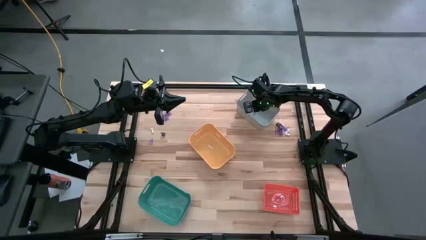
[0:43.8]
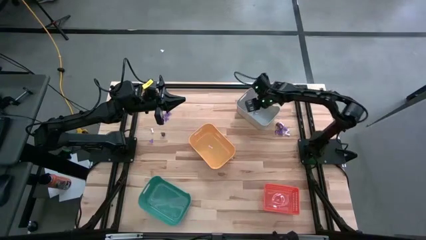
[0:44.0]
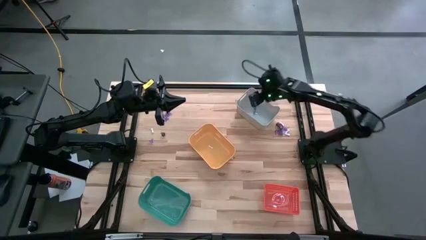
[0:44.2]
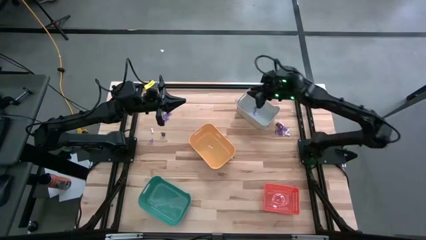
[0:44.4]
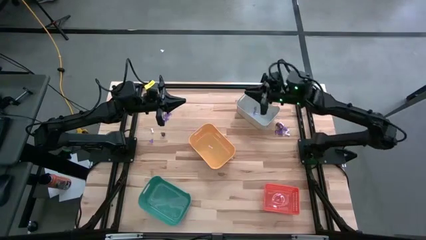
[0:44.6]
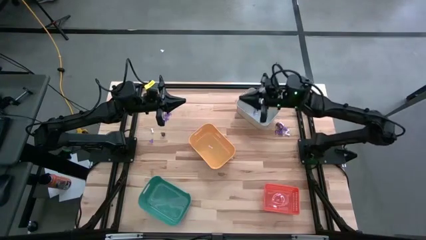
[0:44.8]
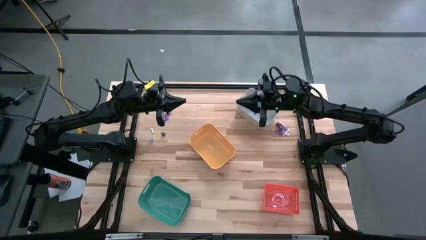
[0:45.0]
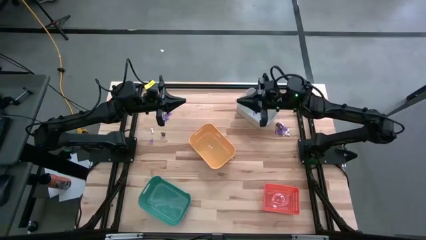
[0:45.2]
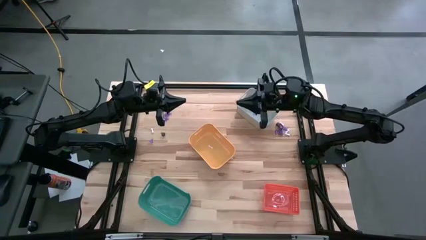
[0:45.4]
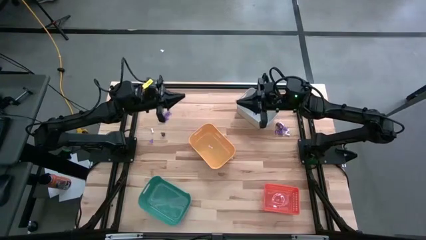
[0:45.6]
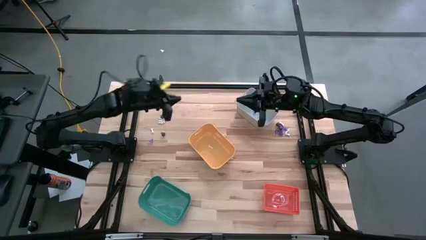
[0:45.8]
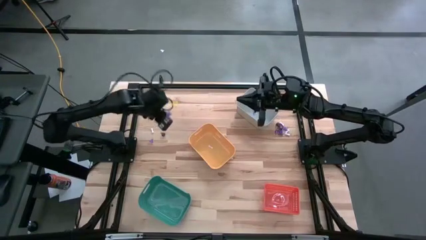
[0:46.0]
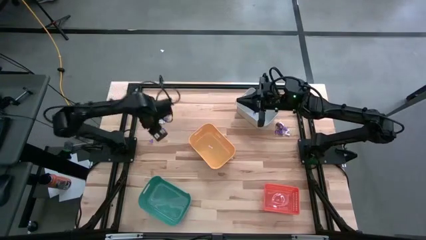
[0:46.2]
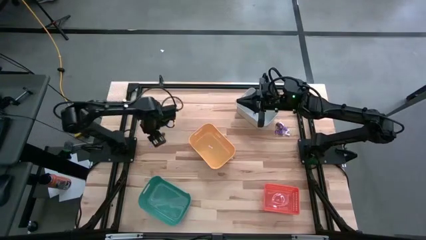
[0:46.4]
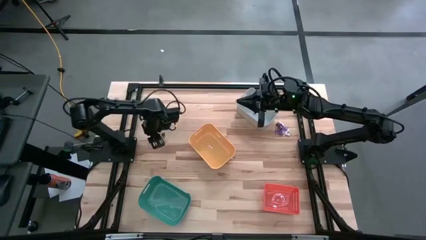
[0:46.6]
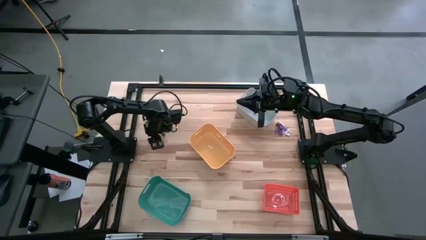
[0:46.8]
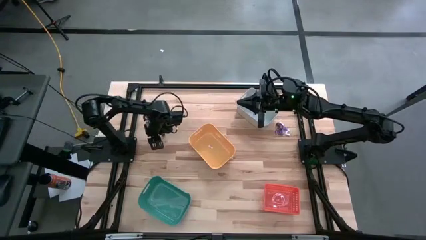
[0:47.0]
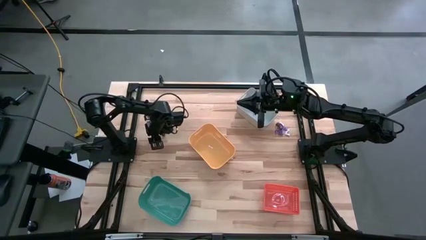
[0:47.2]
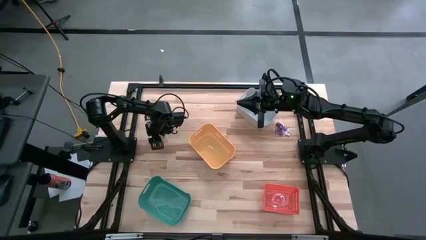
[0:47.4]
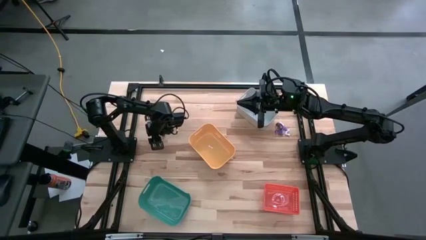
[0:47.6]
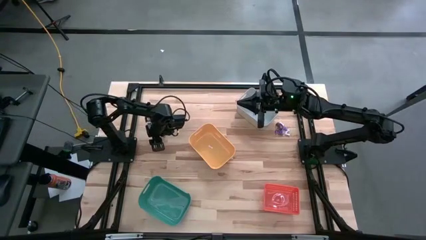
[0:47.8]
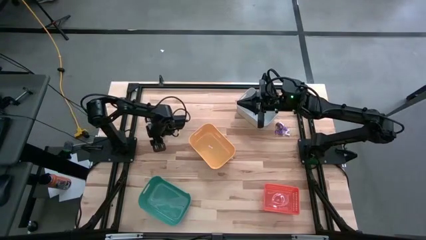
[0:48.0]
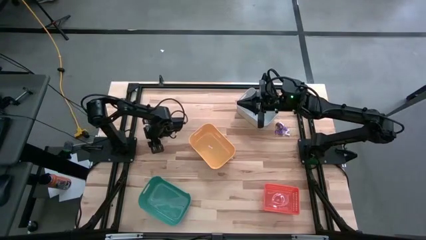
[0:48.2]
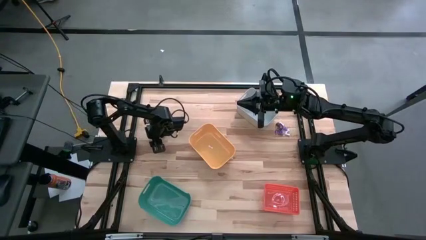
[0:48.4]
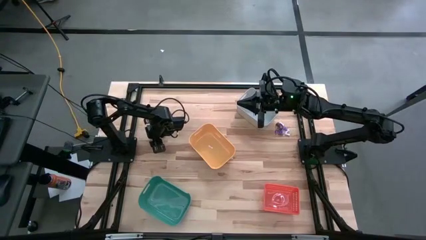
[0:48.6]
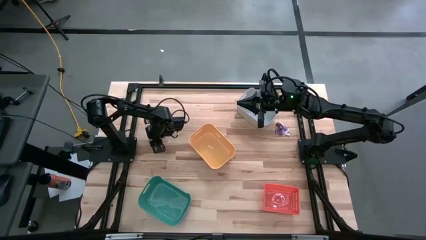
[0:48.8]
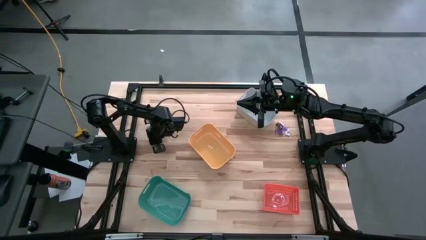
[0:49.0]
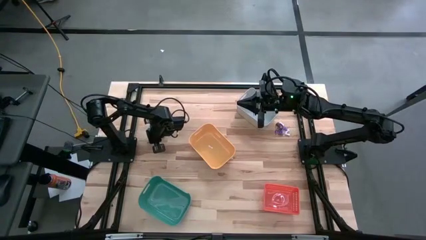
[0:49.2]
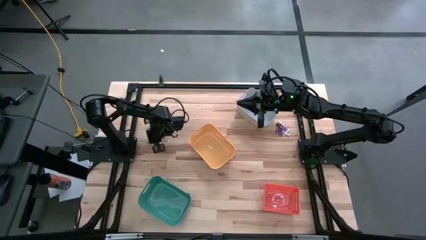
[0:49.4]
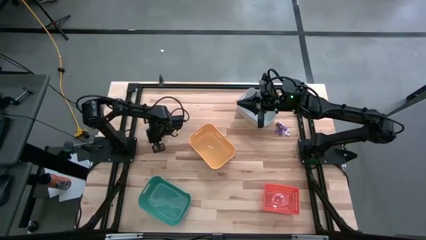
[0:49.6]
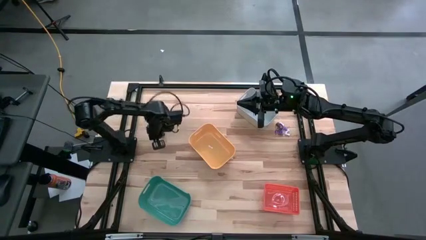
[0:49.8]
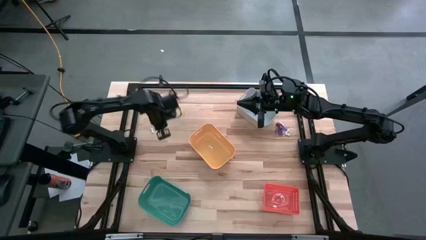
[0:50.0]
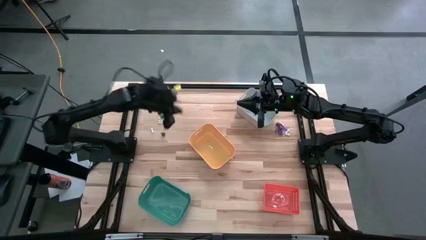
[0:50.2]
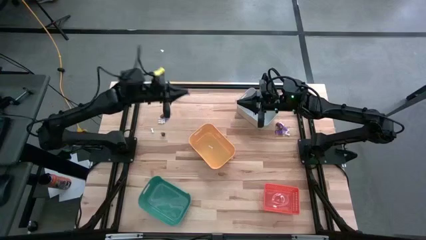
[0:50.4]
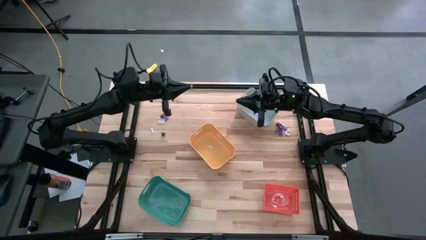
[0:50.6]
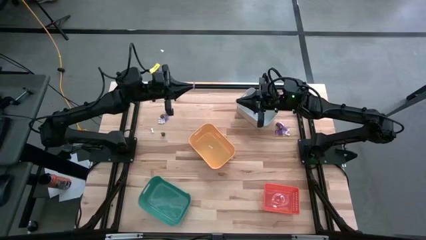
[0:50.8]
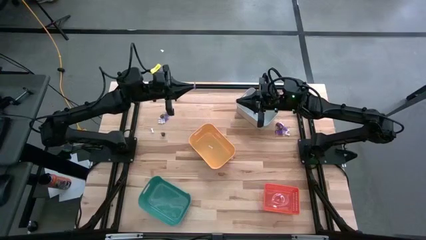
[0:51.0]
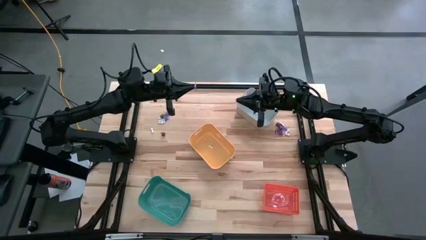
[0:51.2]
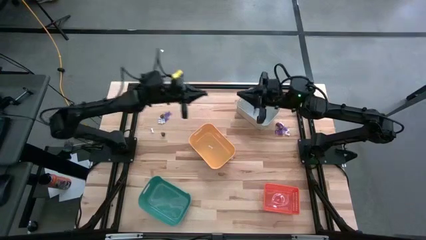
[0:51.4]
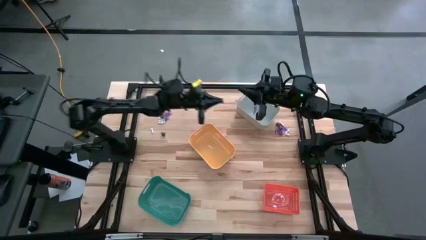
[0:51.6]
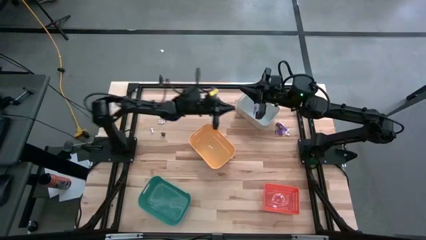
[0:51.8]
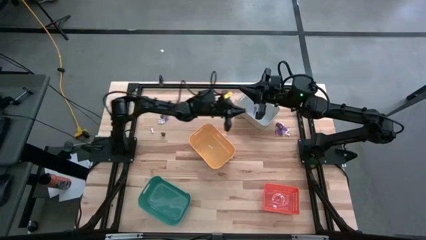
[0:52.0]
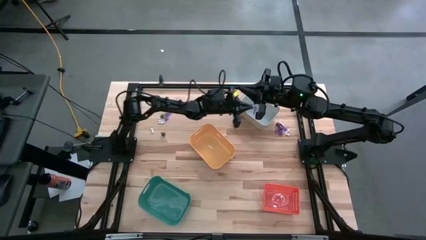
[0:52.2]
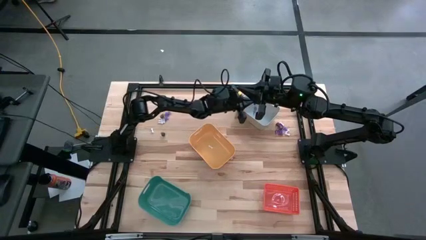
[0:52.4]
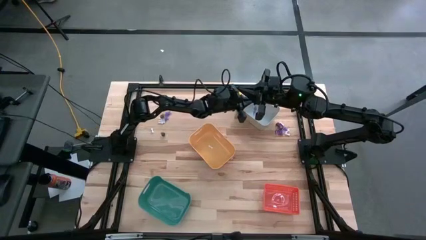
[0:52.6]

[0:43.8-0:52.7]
Task: Sort Halloween decoration
Put the purple witch hat toy into the white bin

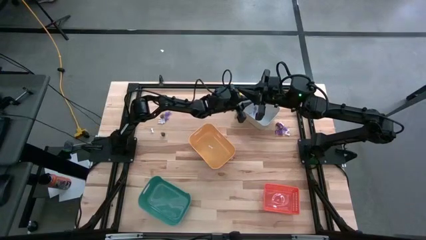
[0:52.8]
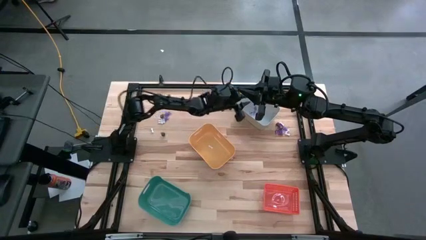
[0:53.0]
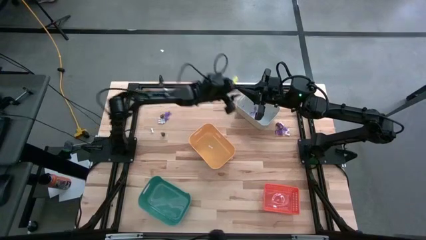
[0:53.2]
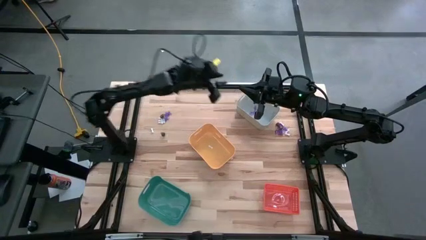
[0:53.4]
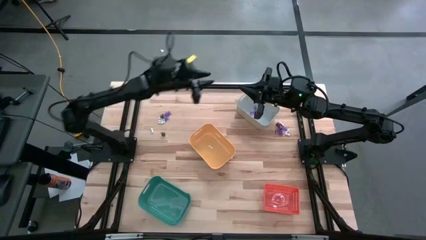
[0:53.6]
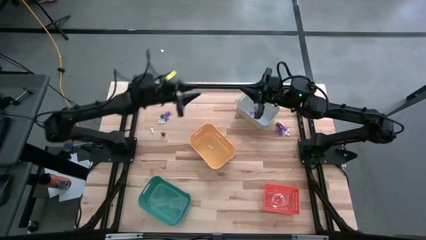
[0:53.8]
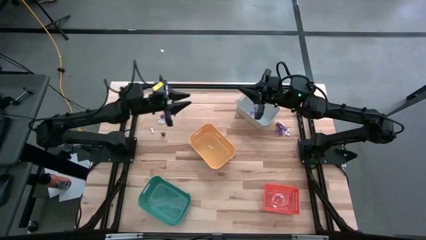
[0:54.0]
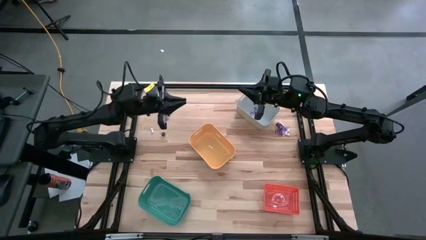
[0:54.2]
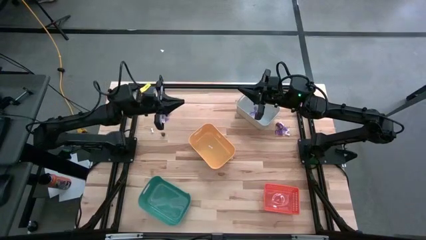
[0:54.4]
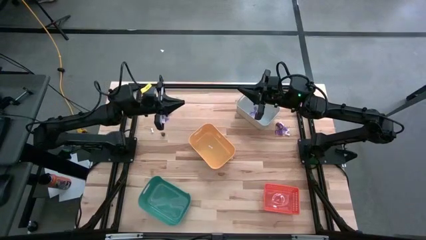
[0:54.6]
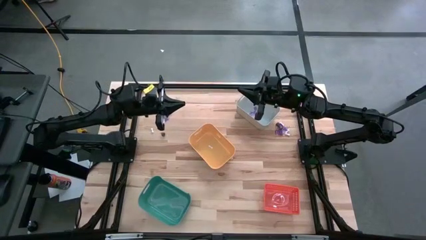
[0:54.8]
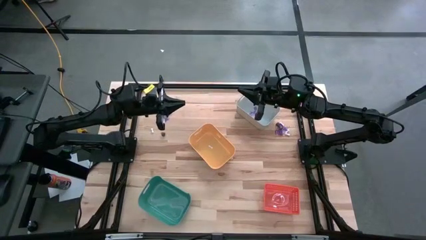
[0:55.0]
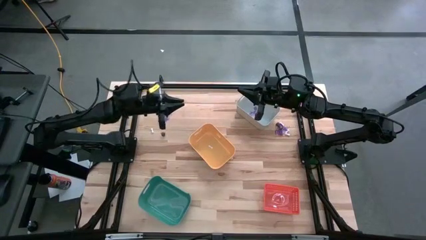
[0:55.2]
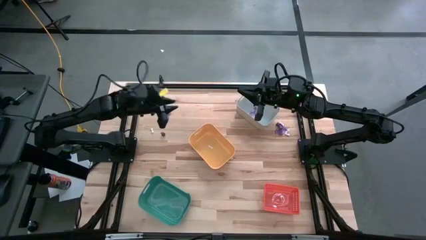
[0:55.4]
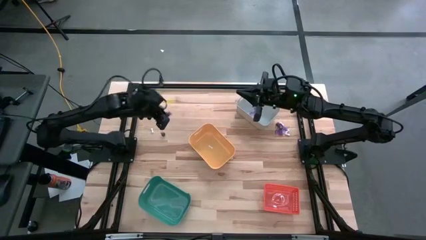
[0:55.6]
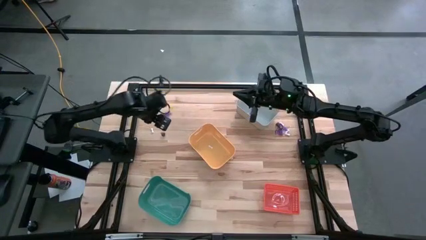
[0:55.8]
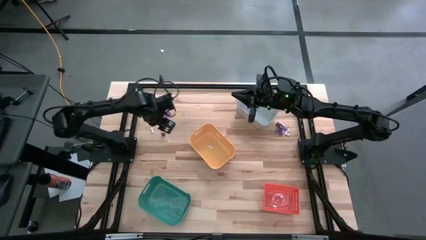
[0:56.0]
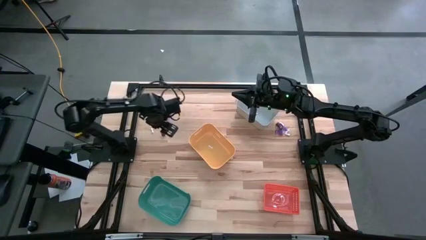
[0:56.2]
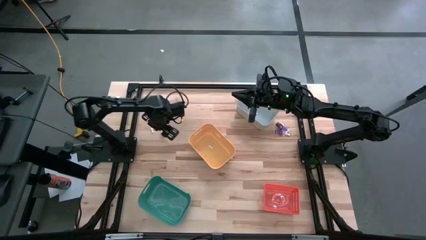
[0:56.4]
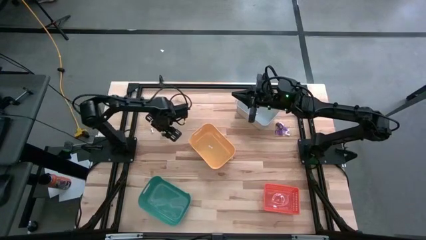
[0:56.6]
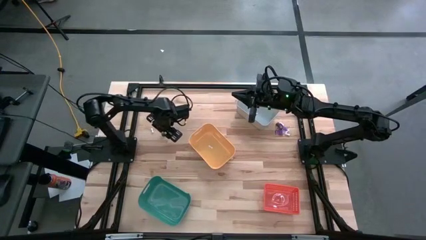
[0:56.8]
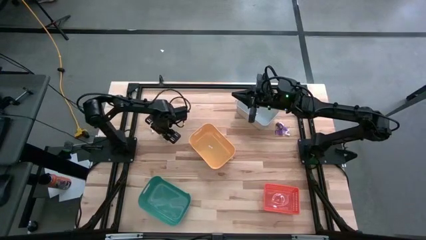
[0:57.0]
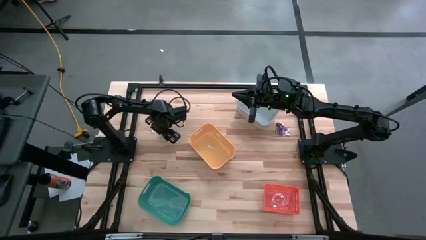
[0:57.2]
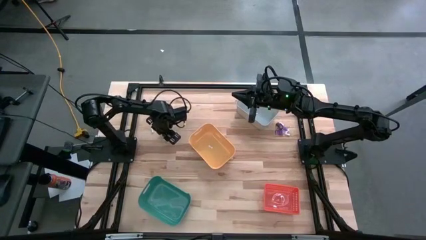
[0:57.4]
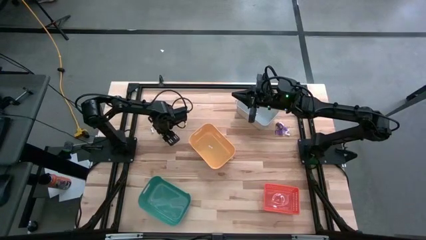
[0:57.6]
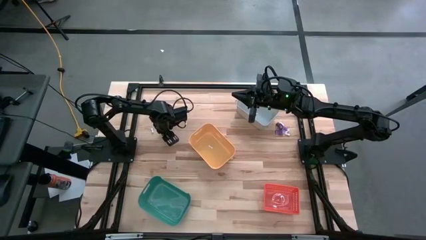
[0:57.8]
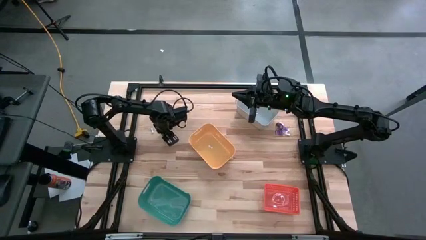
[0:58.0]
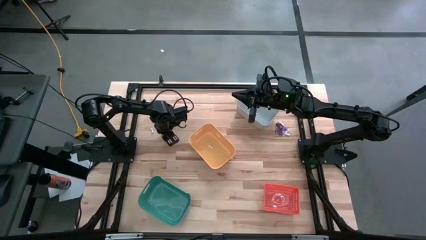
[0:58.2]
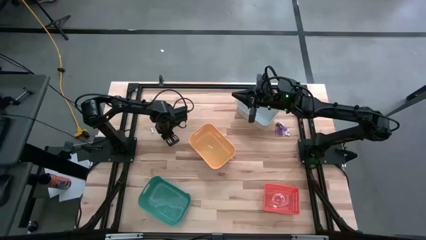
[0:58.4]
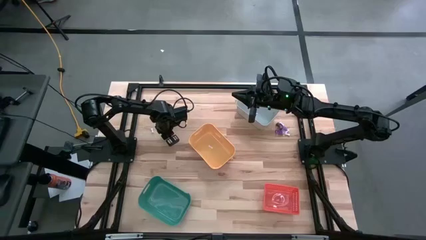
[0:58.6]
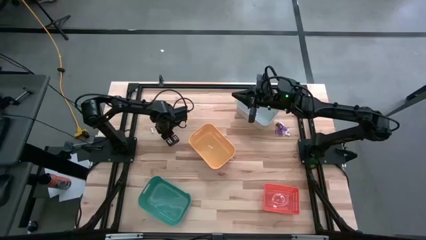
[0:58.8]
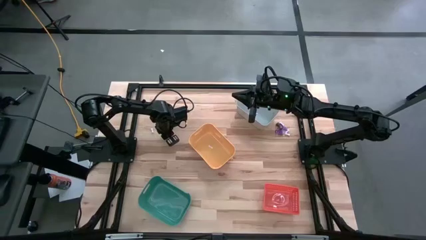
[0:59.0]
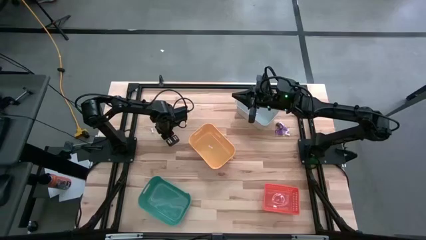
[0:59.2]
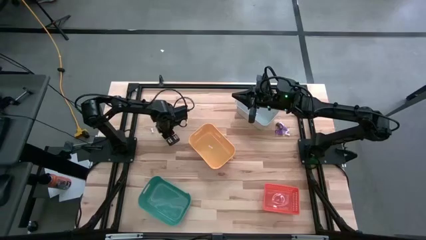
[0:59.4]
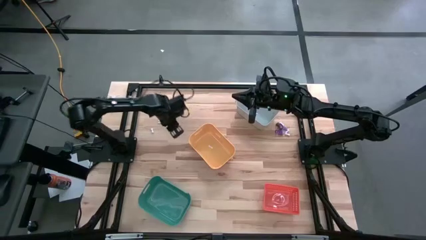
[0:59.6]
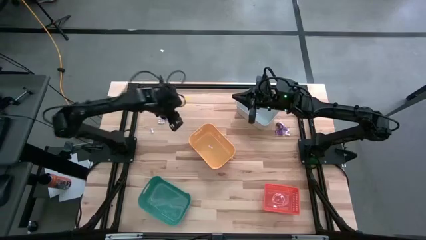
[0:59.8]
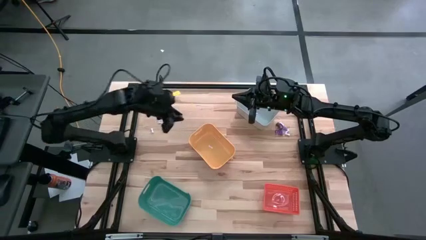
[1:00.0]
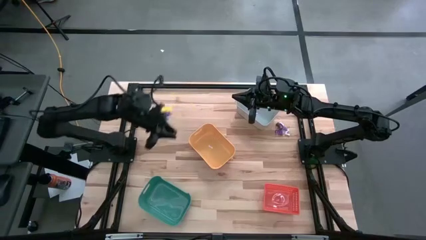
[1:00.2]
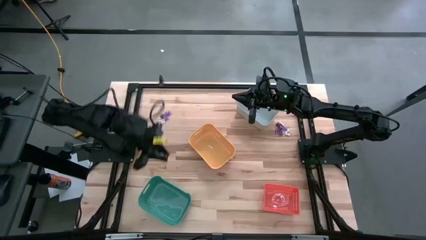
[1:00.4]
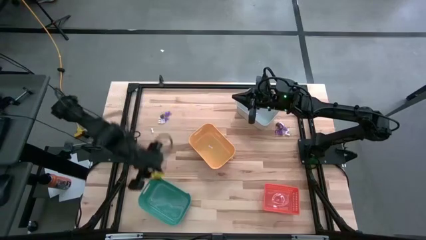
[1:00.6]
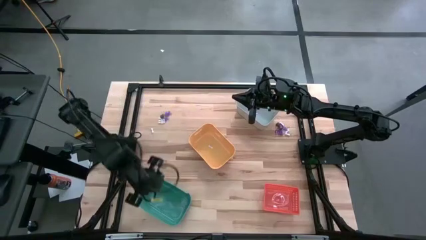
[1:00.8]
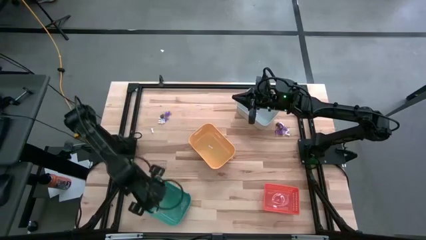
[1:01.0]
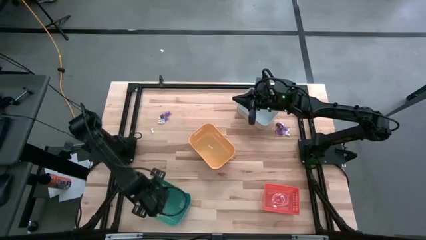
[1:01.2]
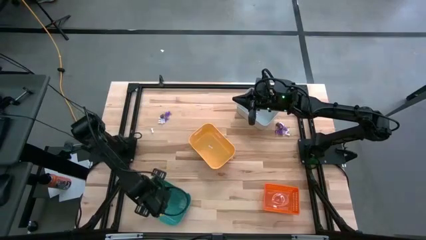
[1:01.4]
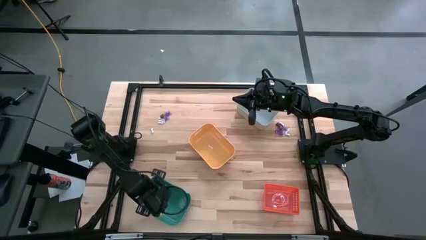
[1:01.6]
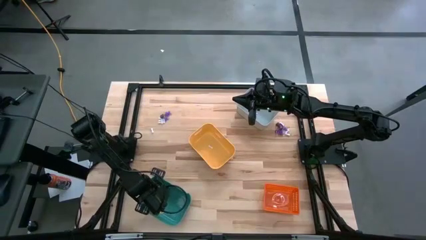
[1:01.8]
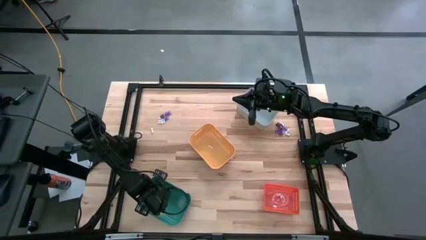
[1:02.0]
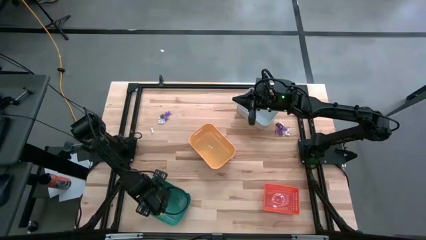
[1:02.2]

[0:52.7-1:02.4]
Put the black skull toy into the green bin
